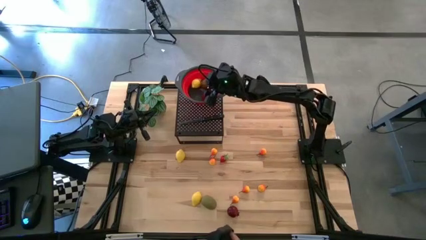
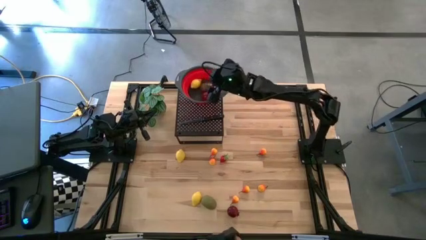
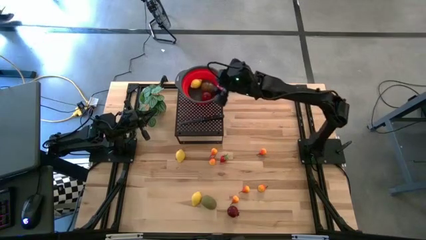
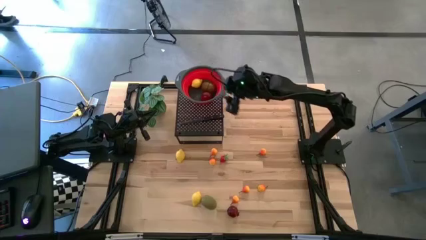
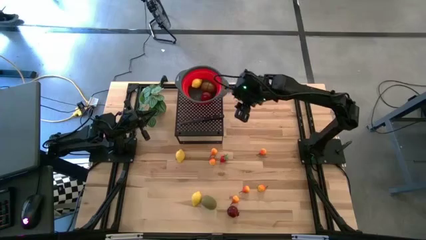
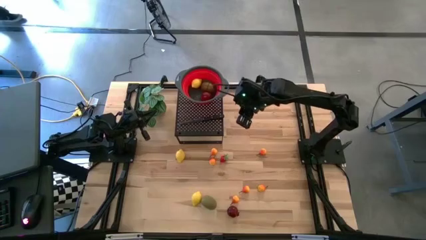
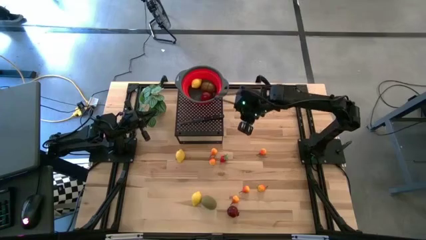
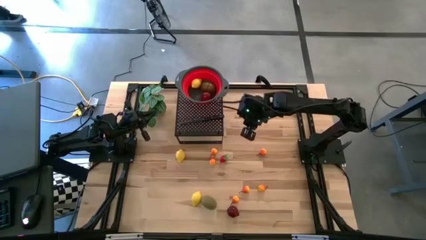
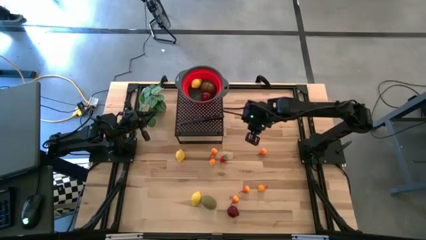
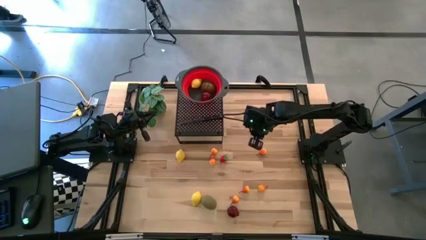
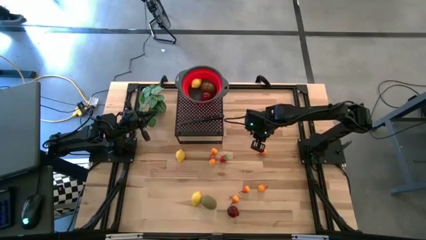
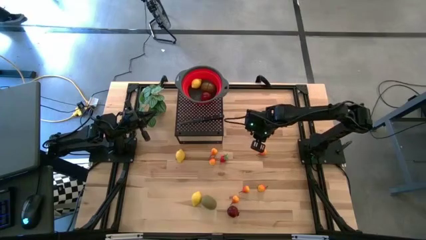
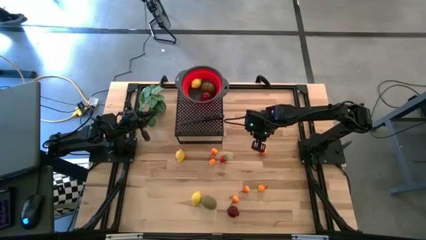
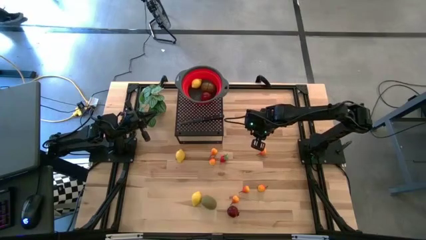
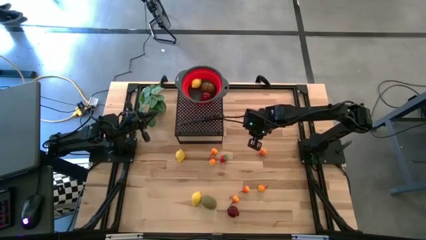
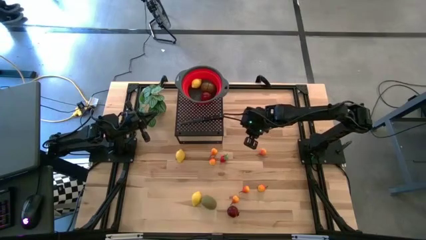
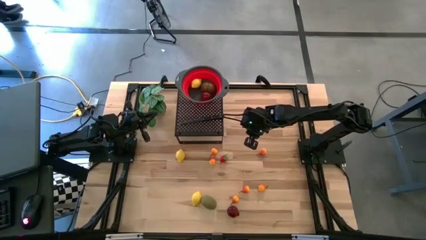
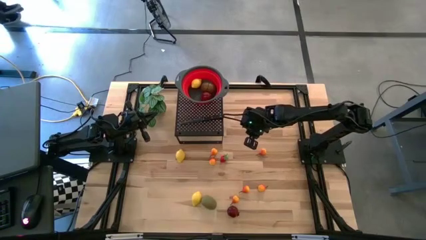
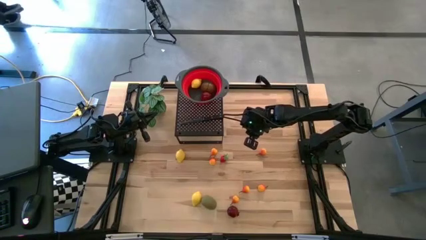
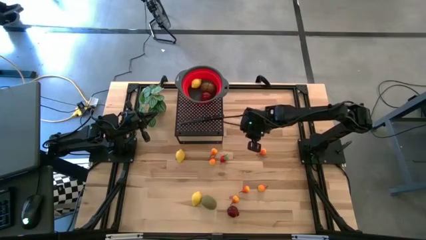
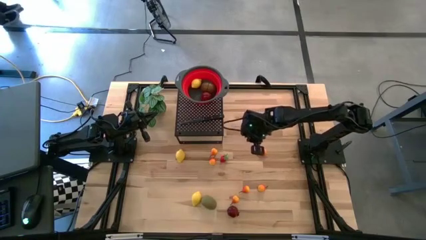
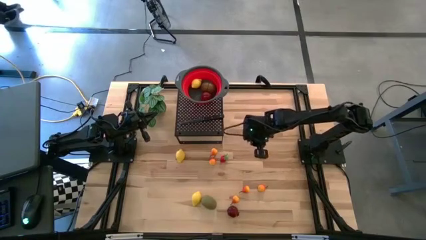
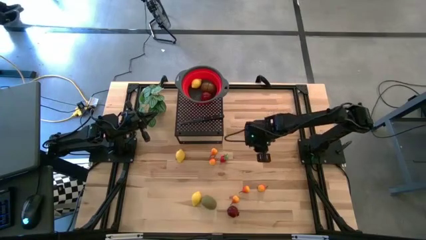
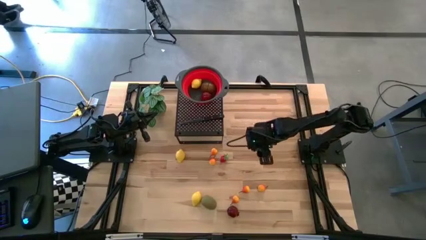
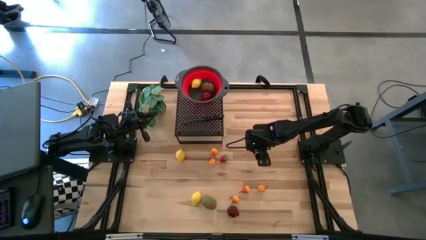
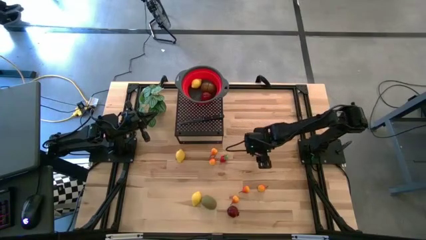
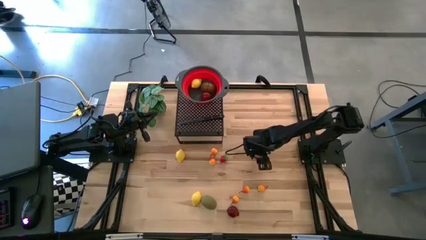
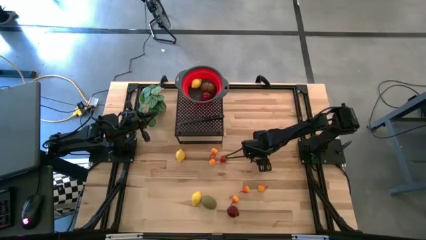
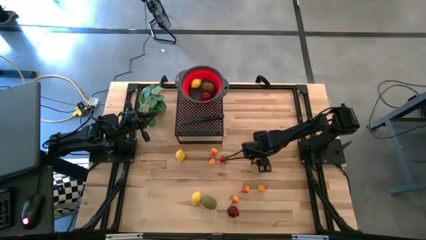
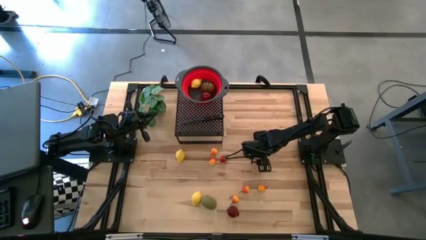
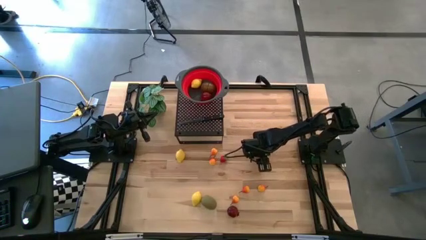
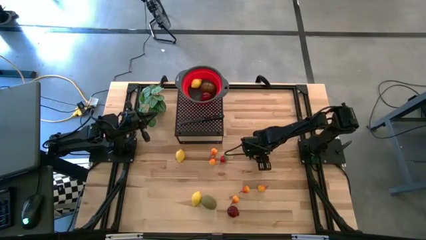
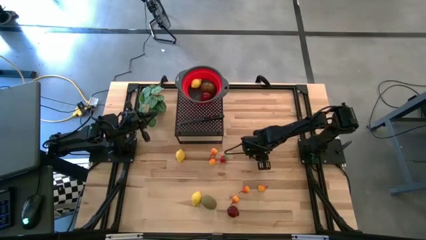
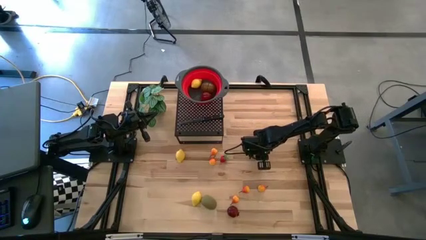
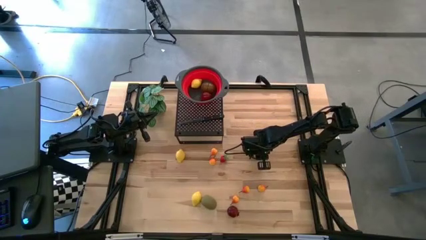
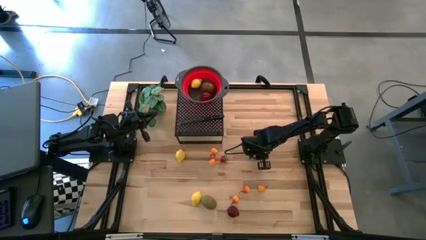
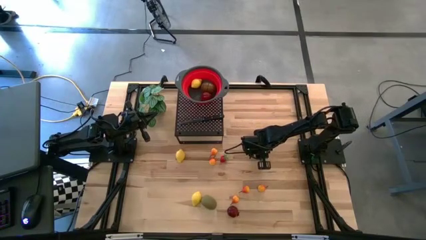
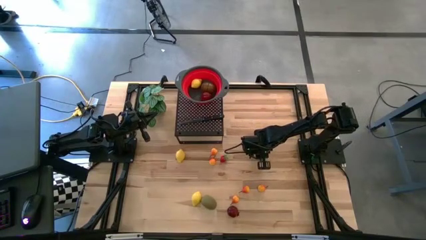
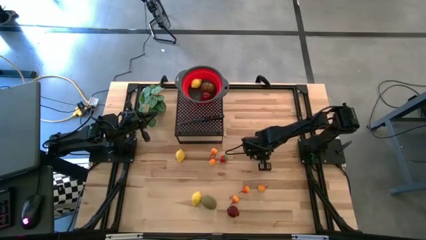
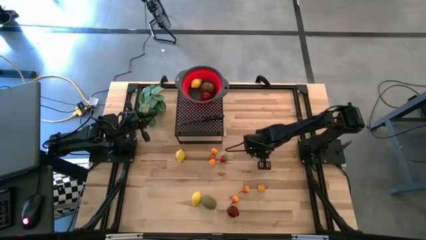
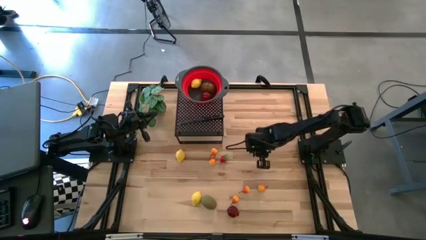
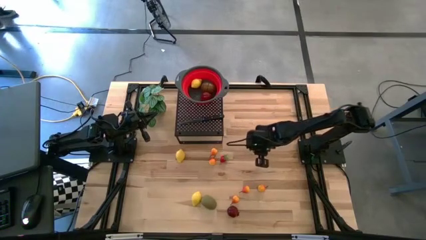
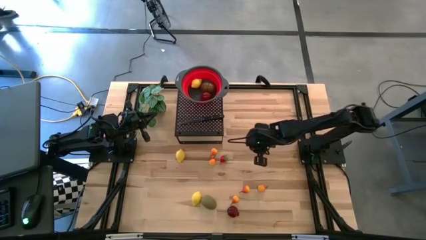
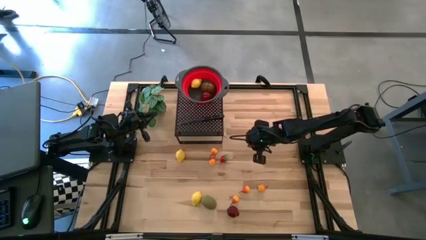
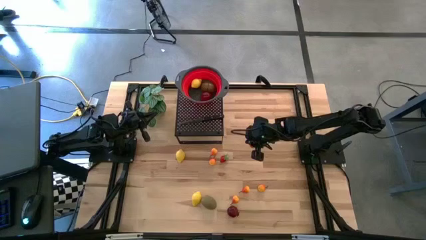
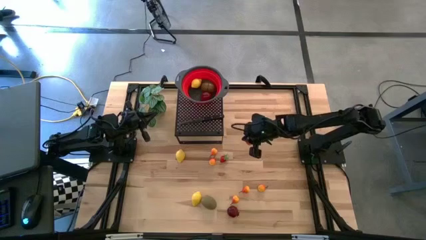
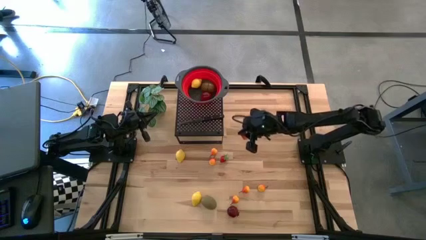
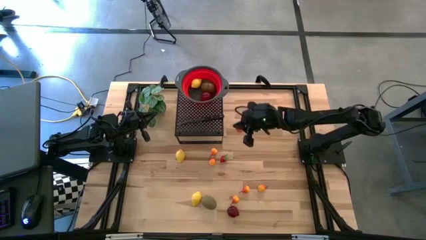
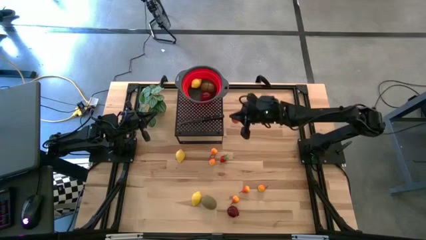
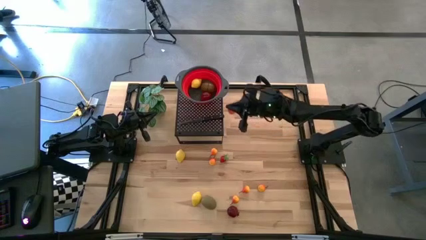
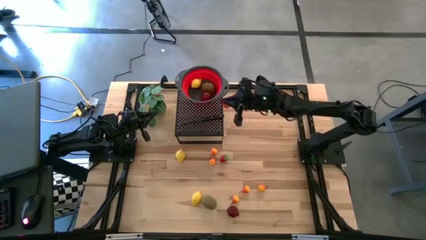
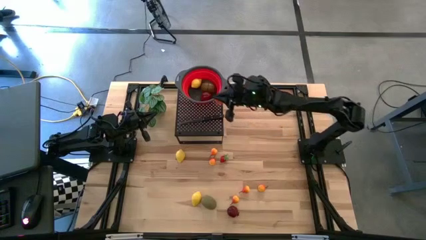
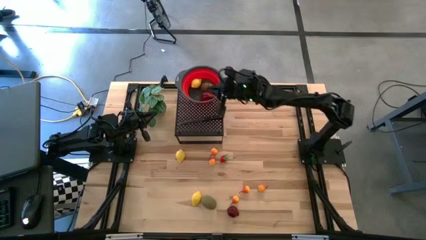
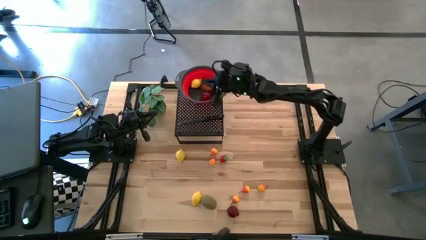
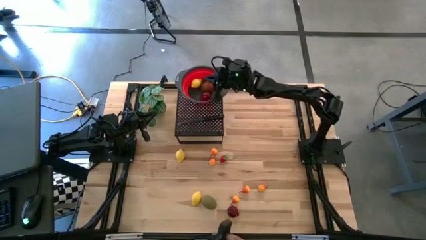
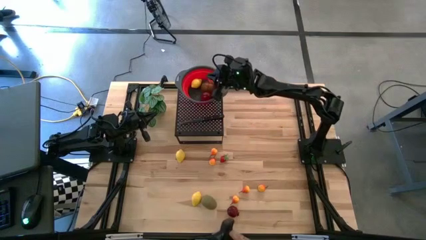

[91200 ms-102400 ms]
Task: Pick & Place Fruit
Put the pear into the red strainer bowl

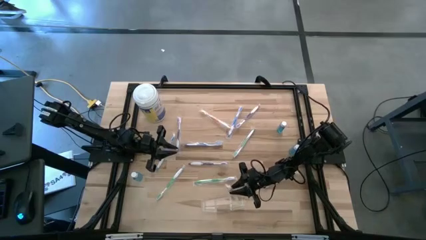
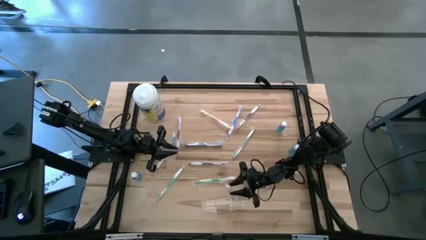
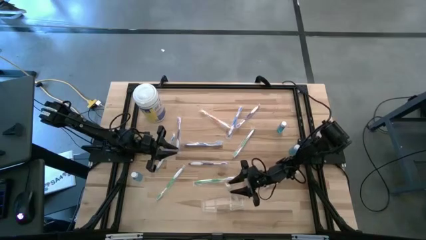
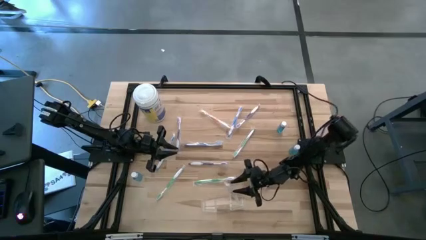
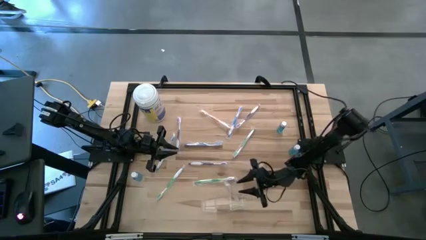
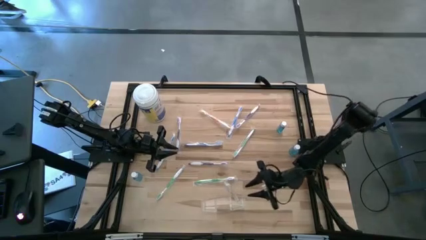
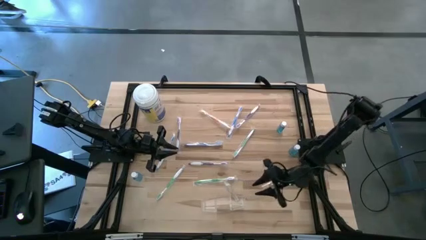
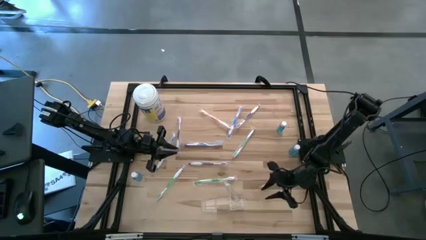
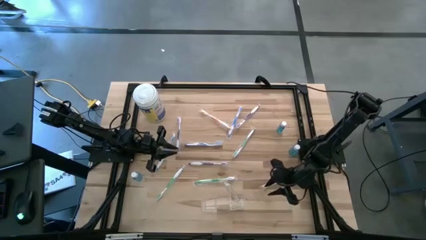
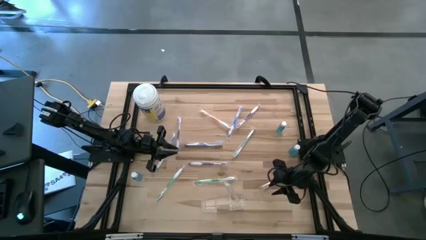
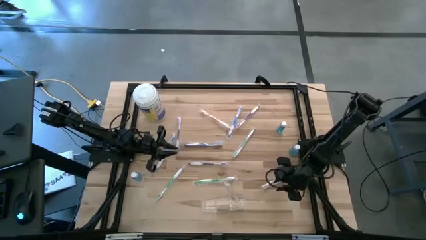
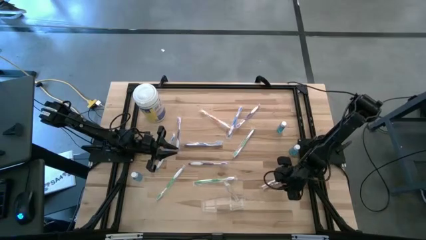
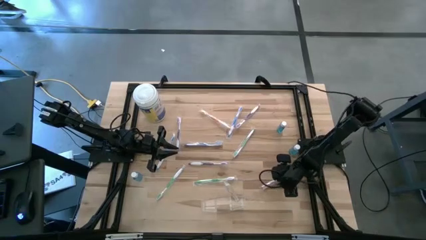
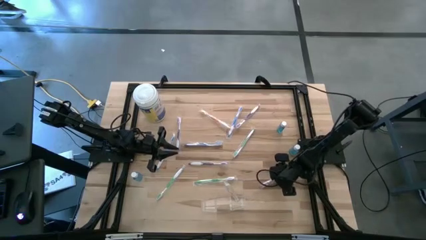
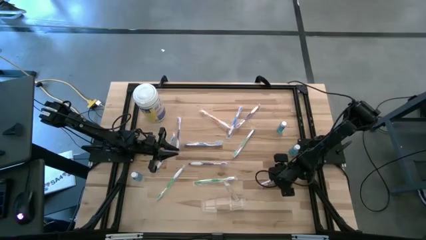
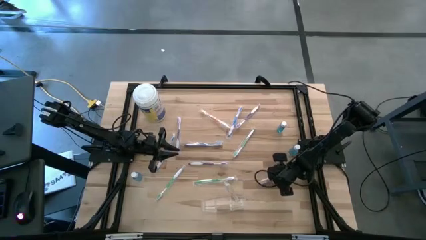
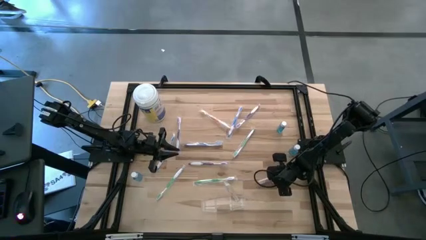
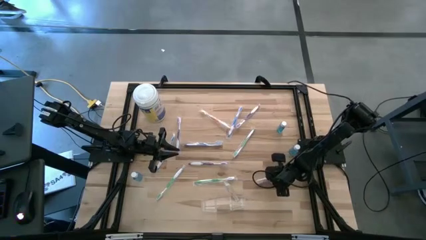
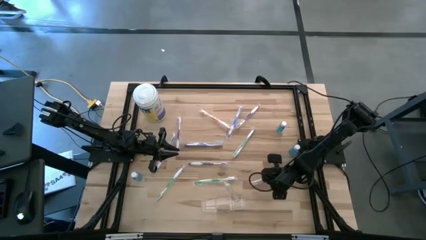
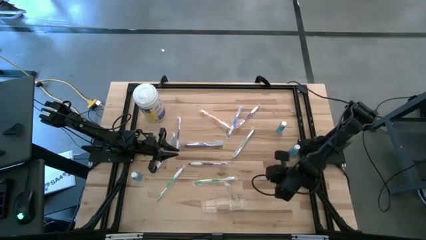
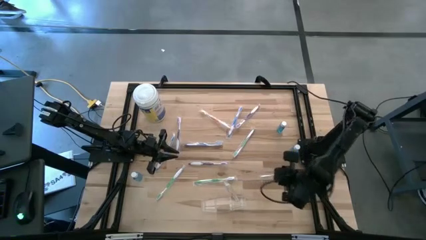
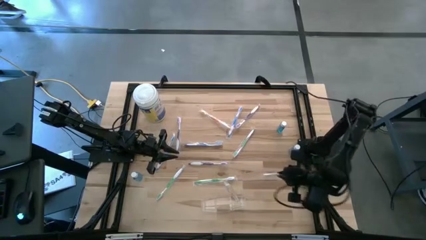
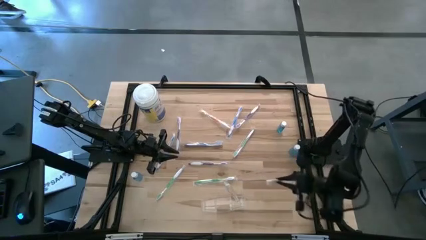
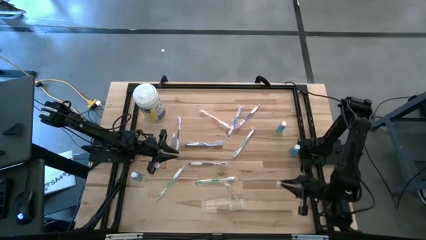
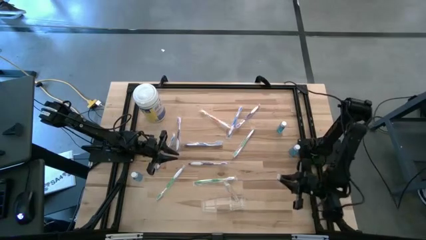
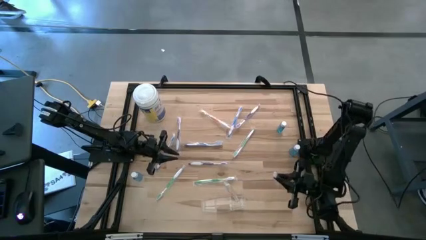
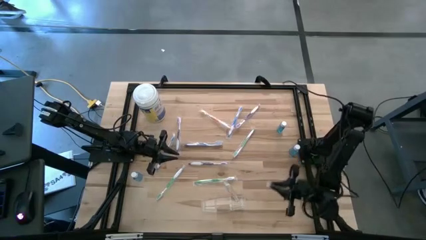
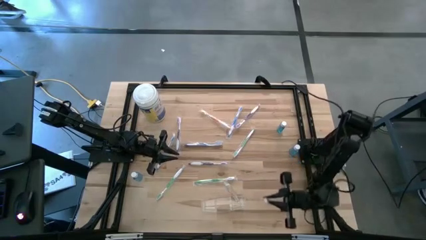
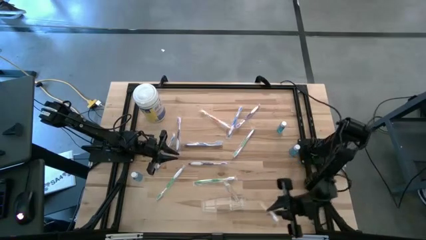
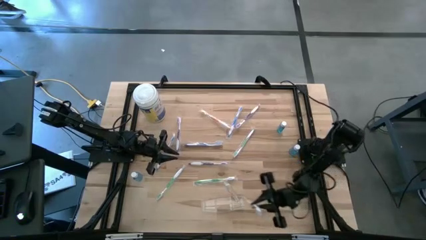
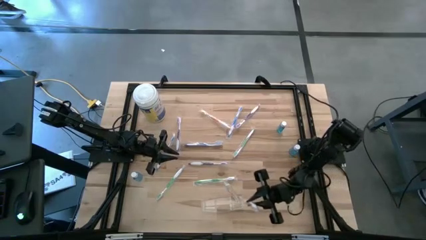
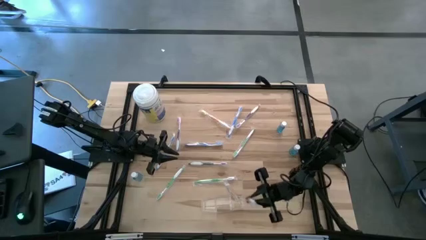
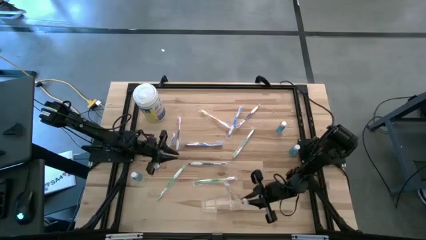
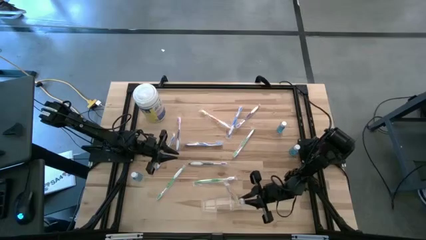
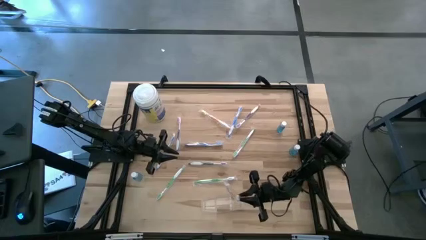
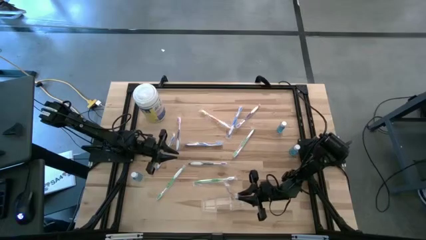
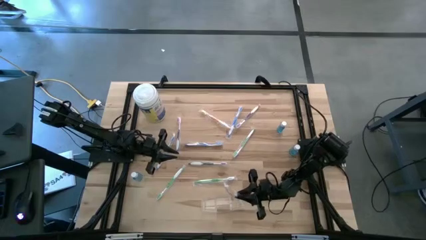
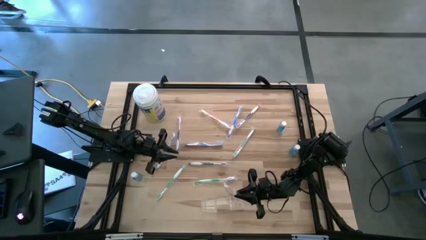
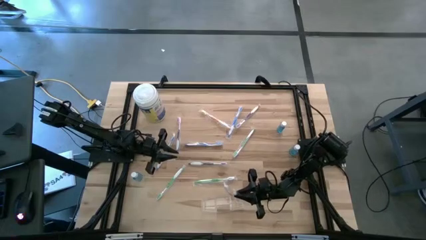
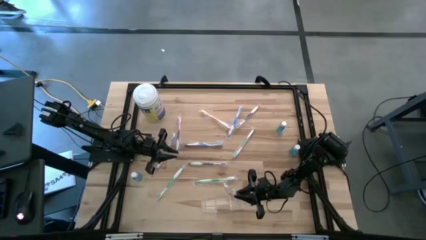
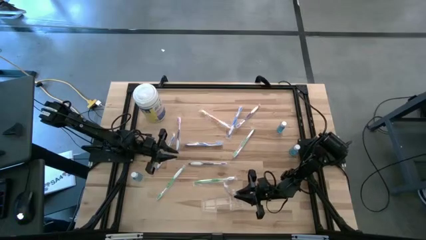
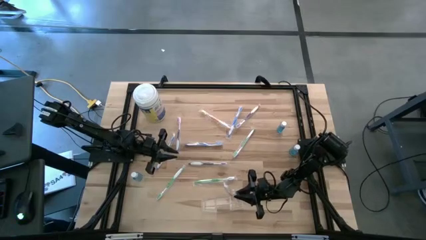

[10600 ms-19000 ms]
Task: Pick & Place toothbrushing station
Put the bottom orange toothbrush into the transparent bin
